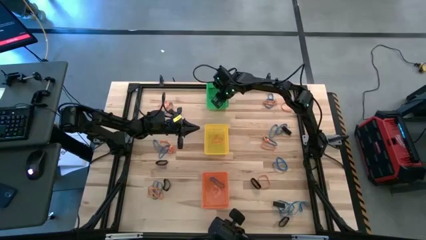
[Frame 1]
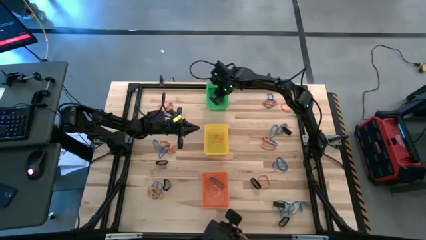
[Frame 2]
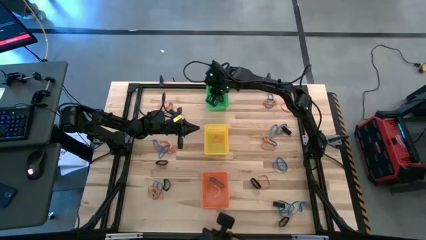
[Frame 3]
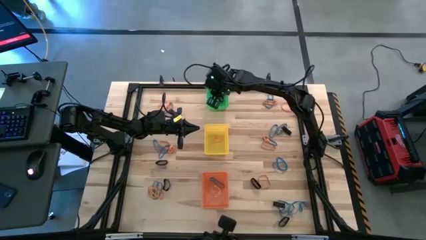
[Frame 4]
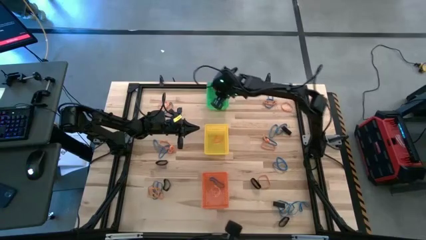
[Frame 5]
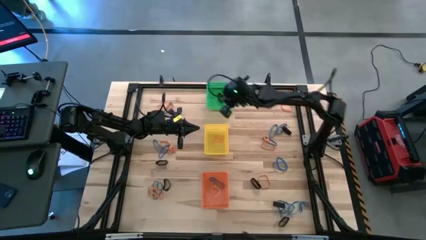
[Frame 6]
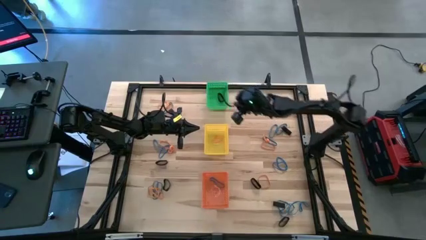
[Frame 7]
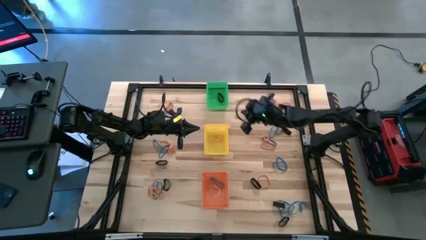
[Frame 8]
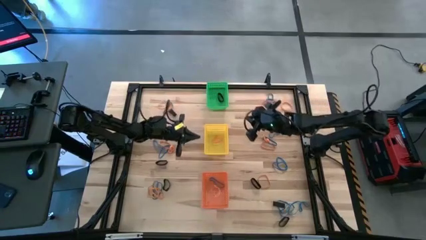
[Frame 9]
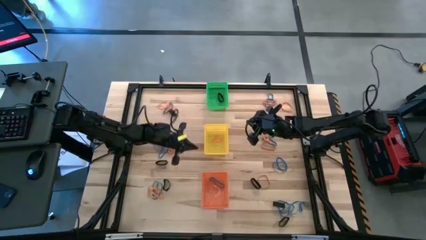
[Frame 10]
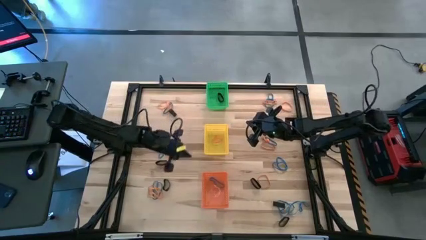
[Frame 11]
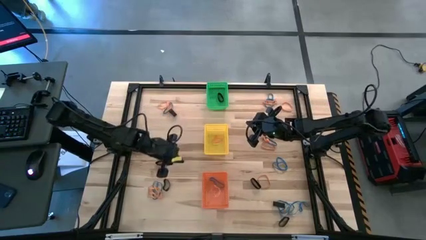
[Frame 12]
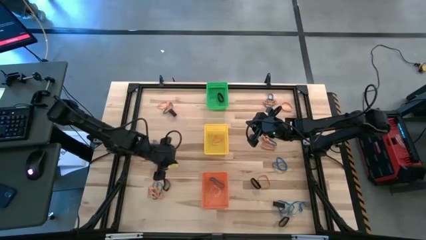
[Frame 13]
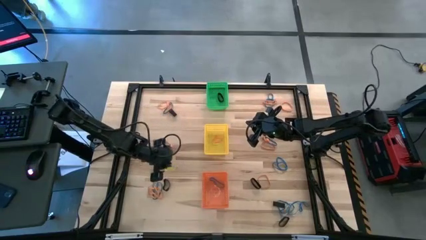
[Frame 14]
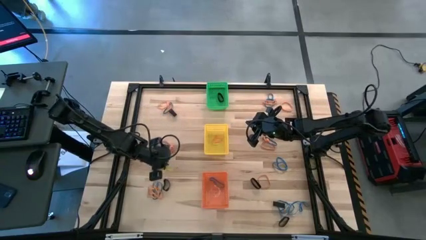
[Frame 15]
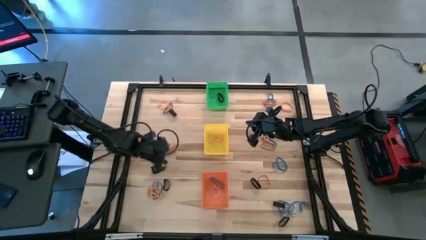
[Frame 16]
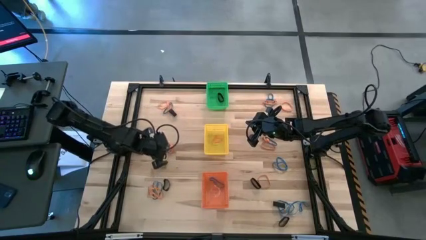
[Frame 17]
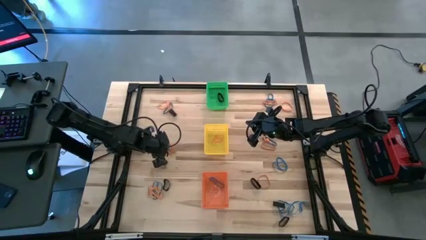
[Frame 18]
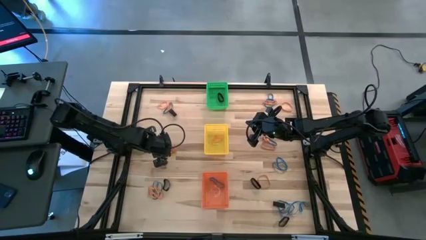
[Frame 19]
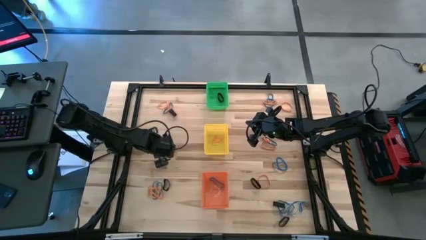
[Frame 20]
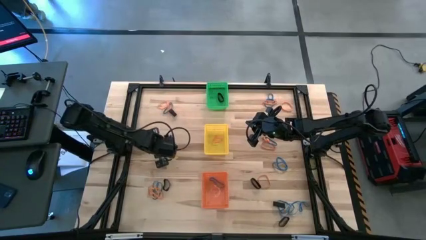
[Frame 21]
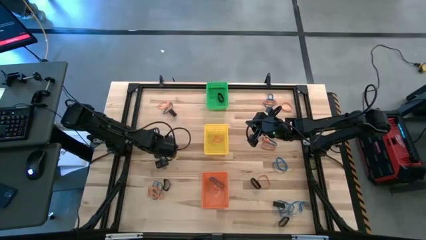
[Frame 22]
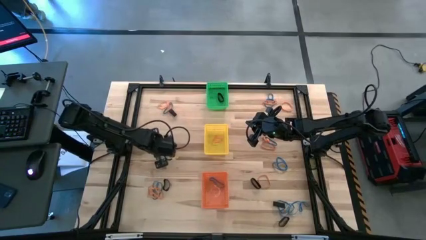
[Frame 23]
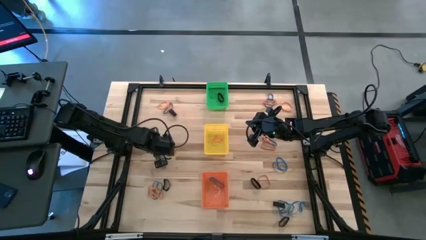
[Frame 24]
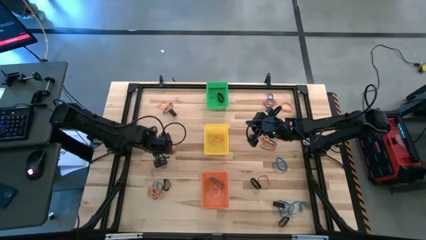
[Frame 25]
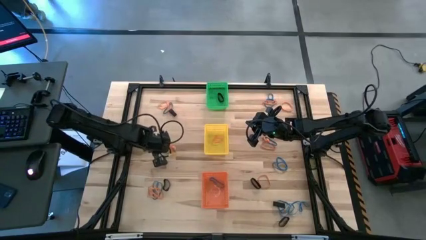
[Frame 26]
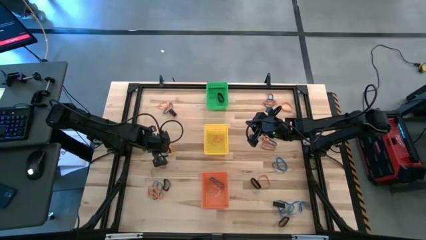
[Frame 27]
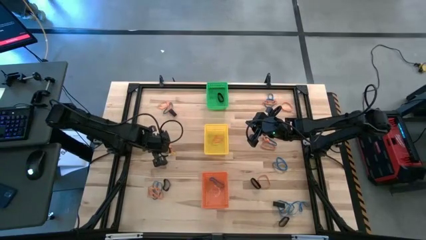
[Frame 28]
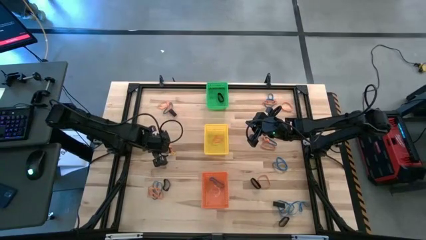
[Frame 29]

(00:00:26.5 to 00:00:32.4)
Task: Sort rubber bands into baskets
Put the blue rubber band into the orange bin

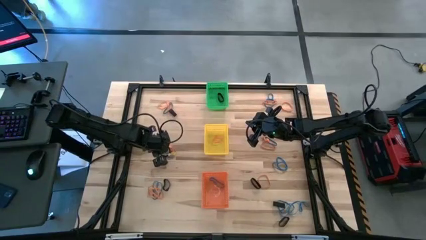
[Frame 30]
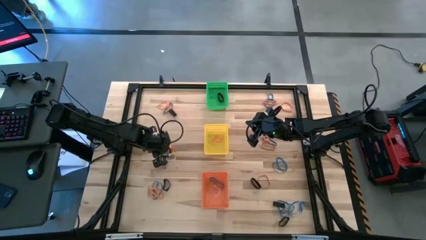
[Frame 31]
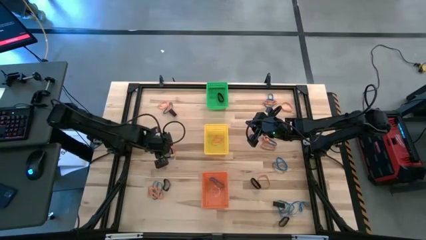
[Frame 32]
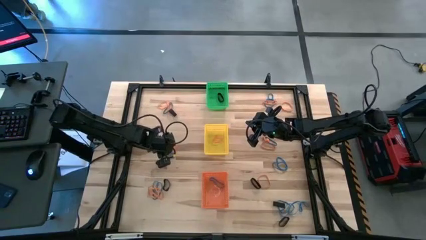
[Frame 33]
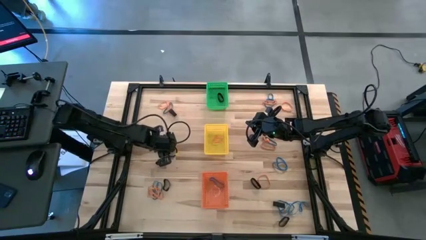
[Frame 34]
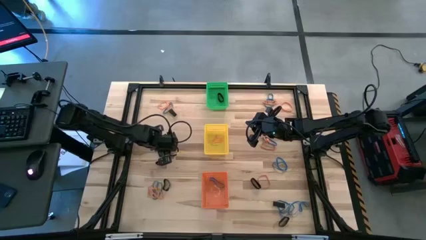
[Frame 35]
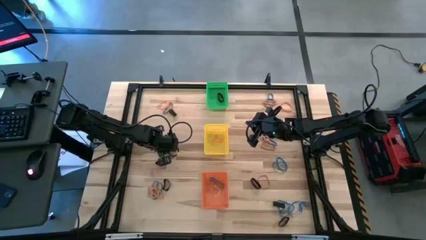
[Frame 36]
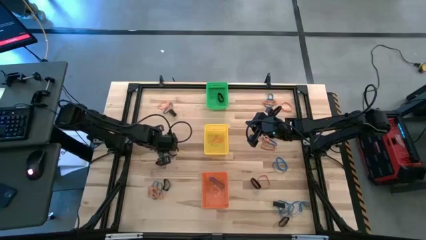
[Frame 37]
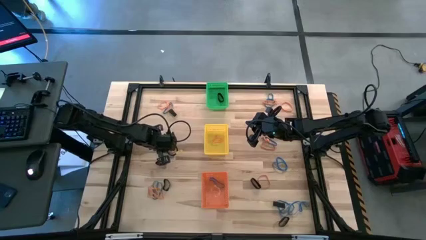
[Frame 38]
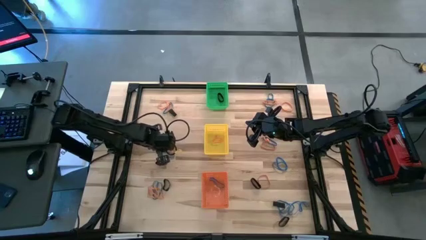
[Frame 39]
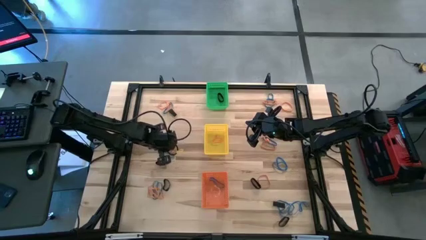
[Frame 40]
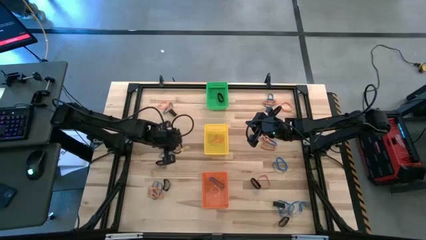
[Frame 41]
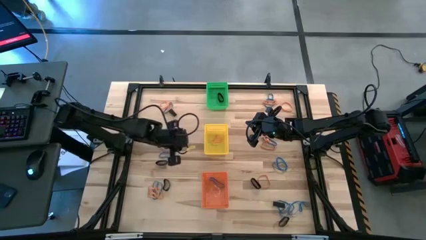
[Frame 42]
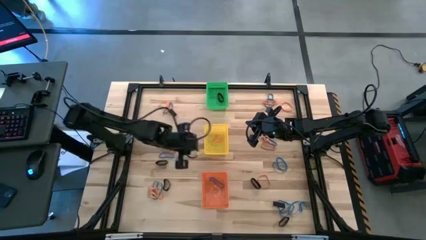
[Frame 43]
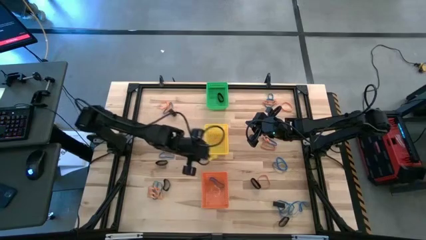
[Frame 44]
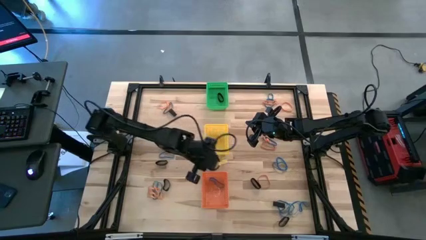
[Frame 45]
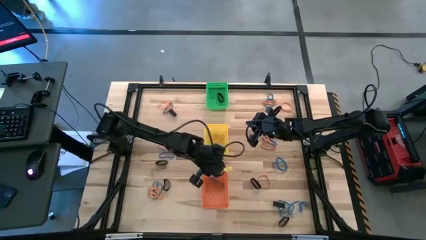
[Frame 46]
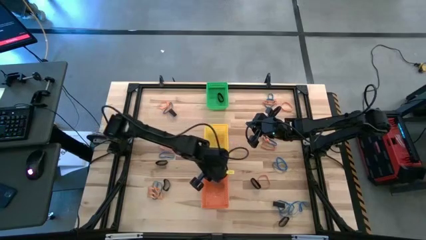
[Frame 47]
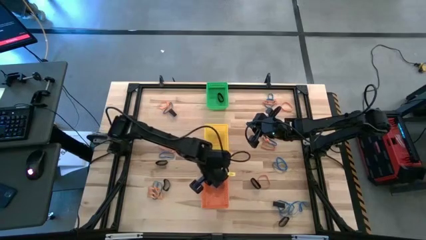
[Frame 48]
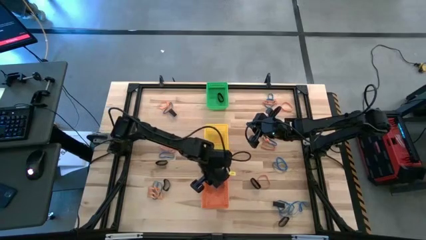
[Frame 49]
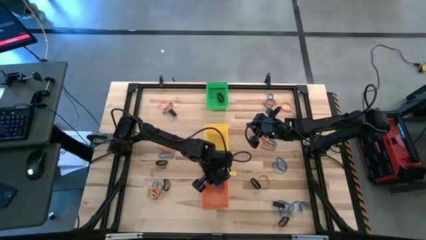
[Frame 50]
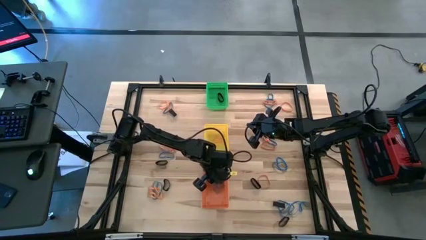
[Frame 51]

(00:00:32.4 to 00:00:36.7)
Put the blue rubber band into the orange bin

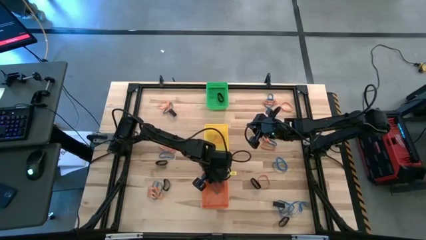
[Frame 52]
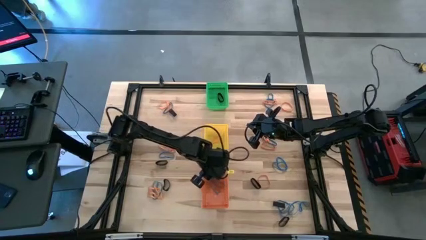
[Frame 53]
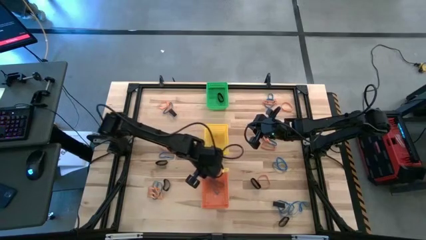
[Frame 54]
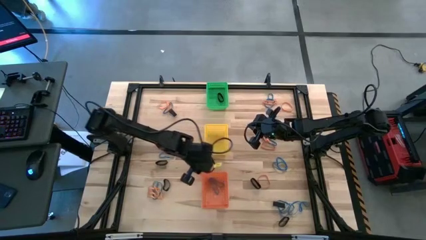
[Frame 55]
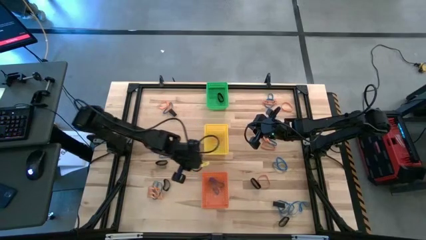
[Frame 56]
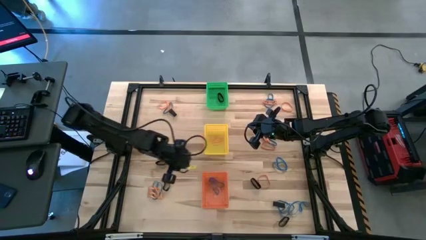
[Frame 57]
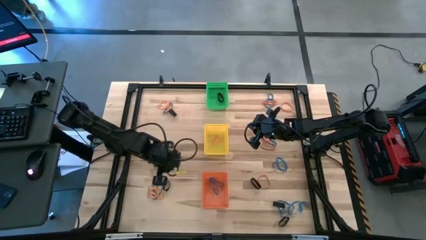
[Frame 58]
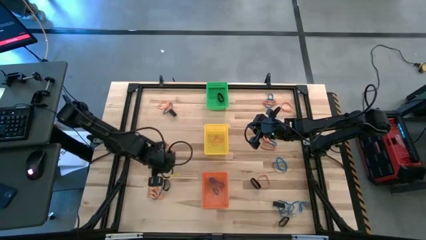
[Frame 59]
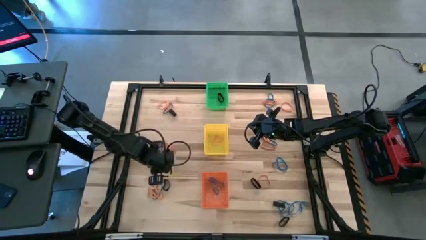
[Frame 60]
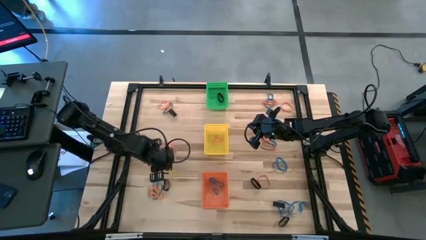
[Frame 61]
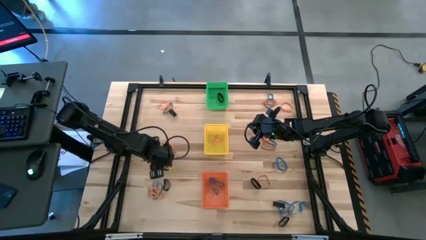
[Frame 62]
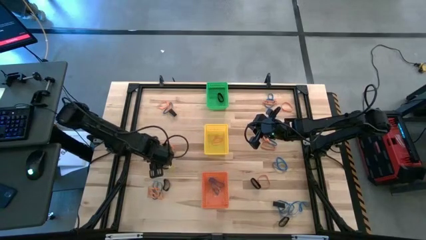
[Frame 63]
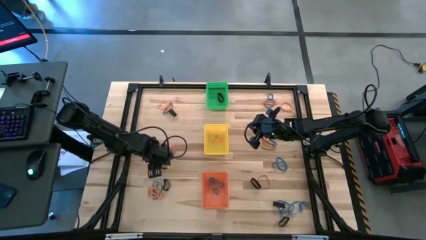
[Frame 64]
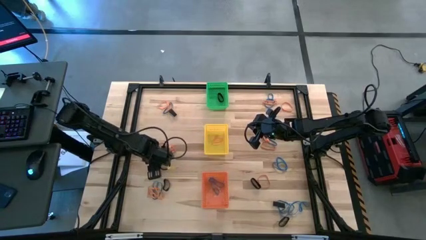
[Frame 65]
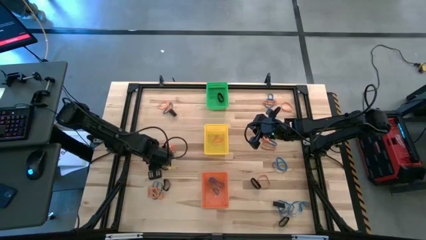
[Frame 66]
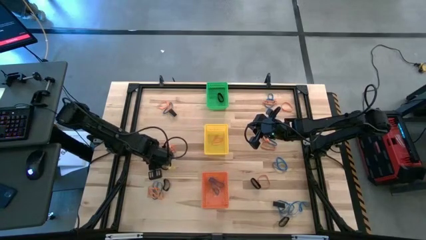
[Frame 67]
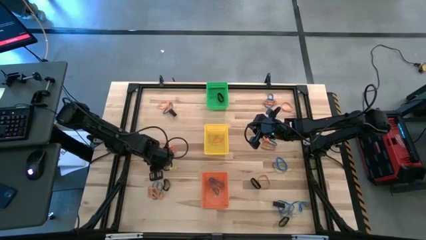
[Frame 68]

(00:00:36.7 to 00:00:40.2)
Put the black rubber band into the green bin

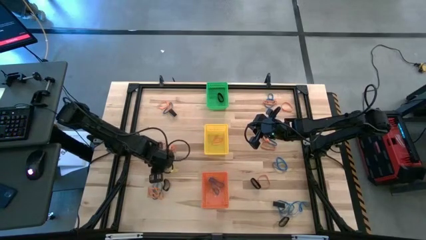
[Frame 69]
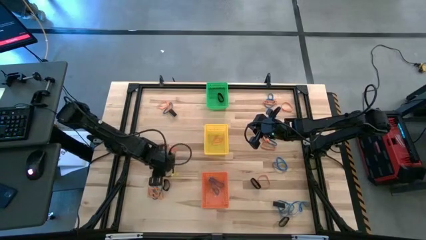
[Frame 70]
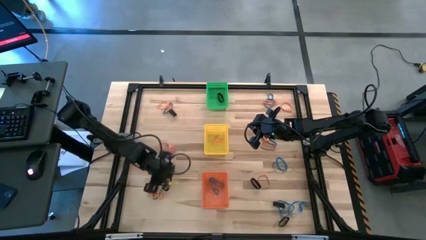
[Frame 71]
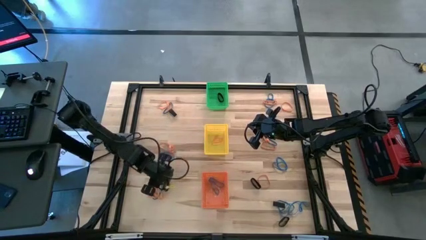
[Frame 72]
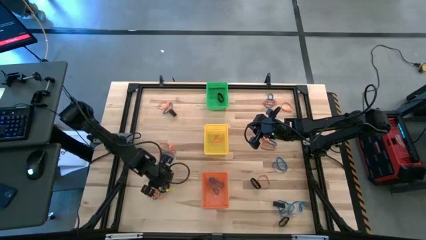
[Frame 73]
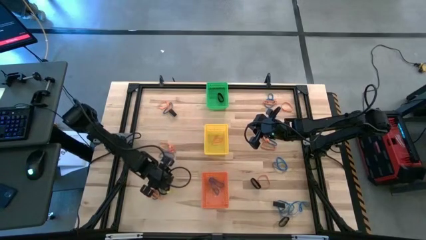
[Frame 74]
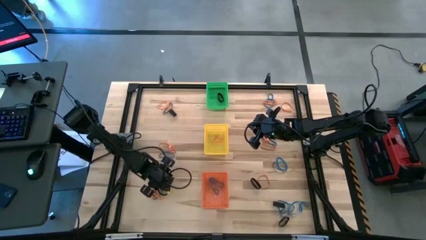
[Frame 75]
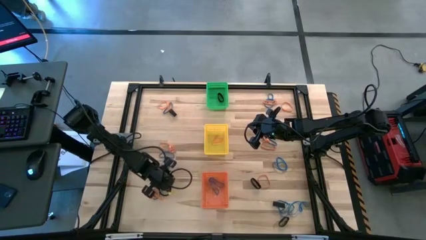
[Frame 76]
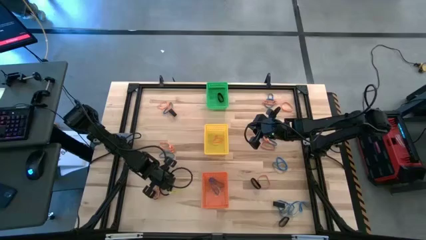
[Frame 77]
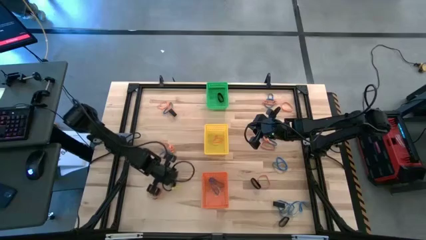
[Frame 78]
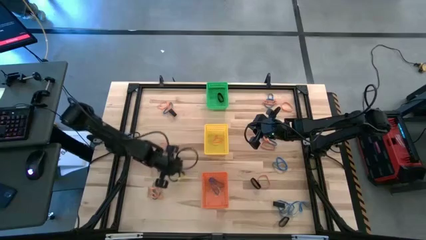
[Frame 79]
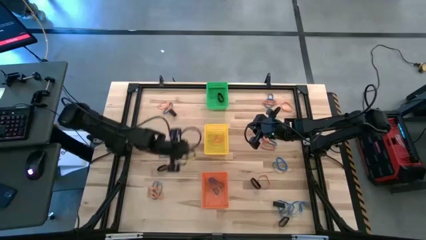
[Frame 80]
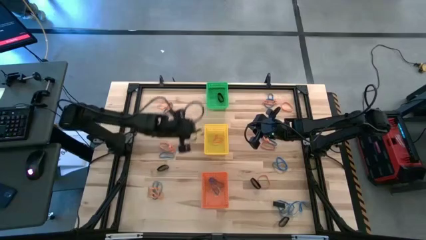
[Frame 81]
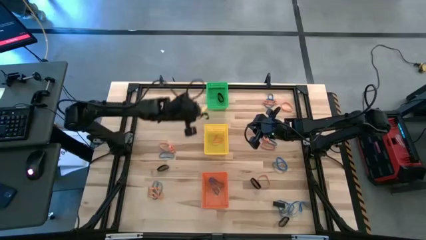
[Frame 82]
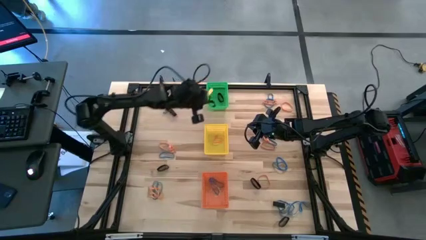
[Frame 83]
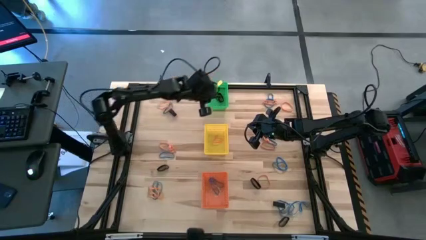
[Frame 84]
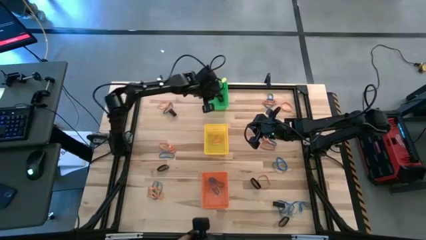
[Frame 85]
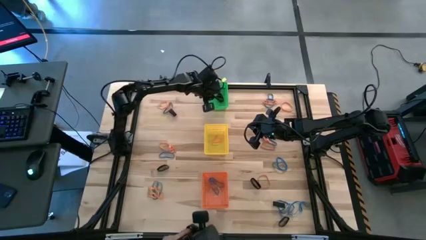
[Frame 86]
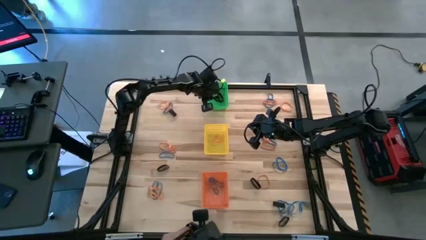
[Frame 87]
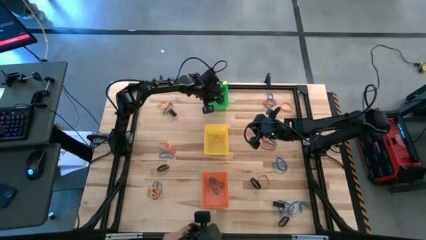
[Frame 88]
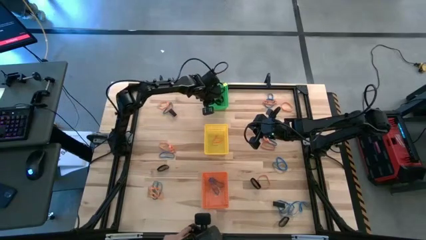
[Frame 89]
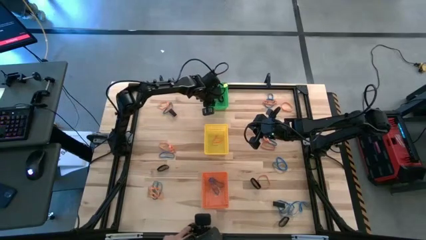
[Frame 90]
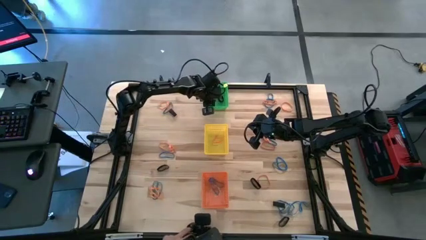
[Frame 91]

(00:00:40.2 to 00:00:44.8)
Put the black rubber band into the green bin
